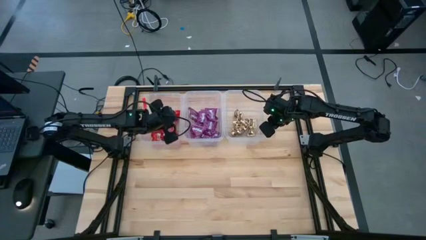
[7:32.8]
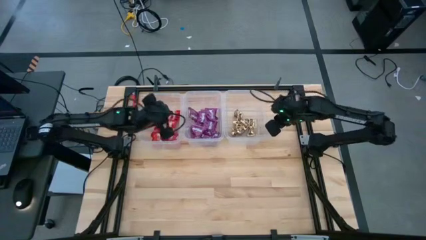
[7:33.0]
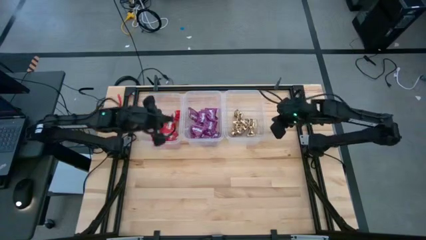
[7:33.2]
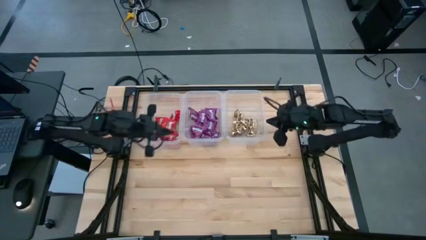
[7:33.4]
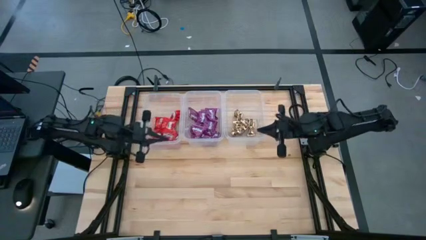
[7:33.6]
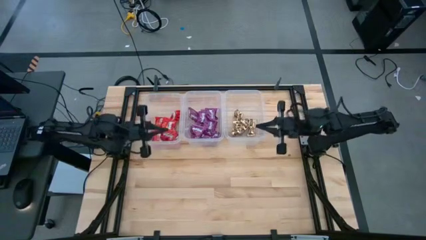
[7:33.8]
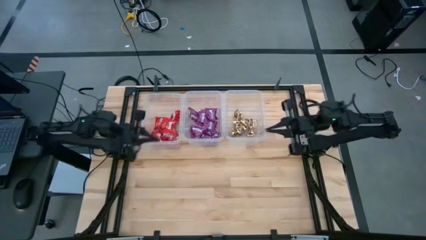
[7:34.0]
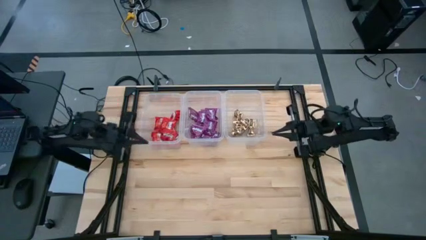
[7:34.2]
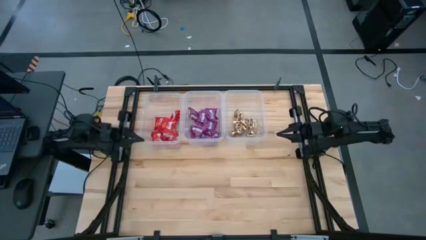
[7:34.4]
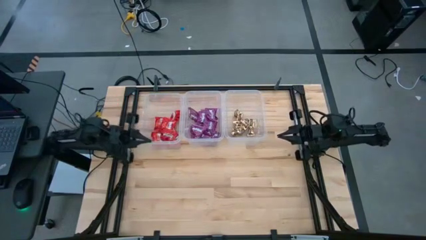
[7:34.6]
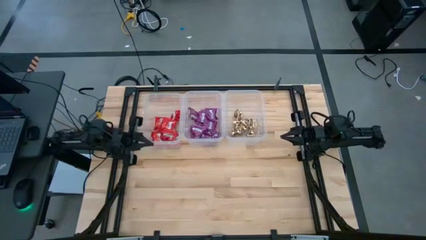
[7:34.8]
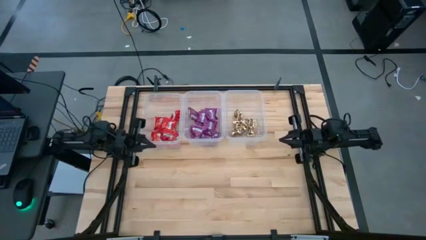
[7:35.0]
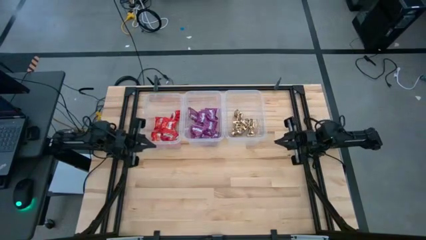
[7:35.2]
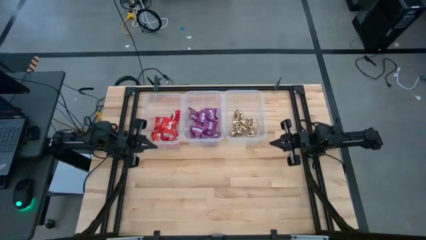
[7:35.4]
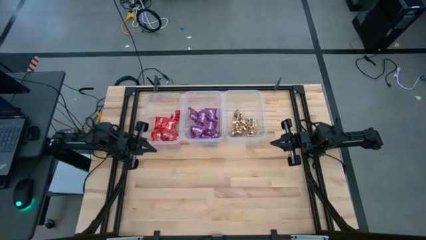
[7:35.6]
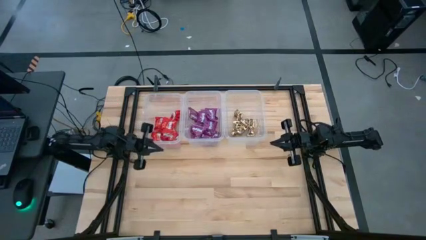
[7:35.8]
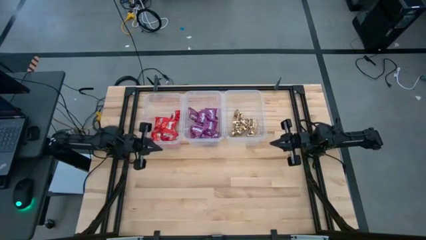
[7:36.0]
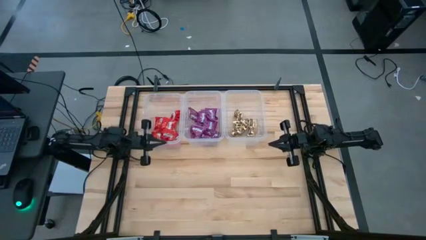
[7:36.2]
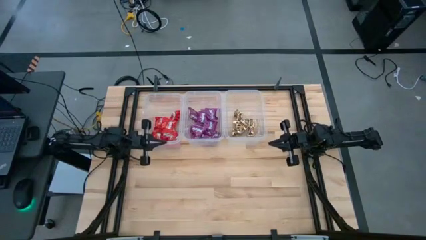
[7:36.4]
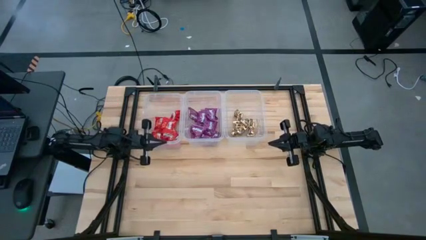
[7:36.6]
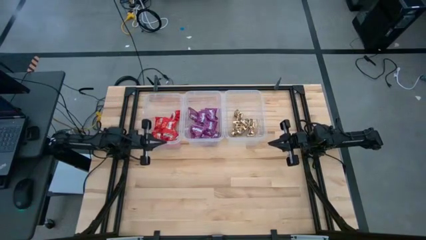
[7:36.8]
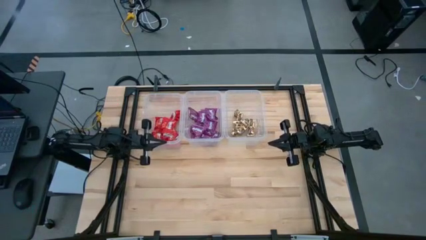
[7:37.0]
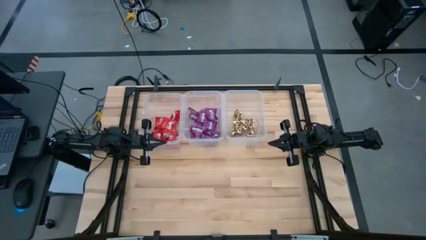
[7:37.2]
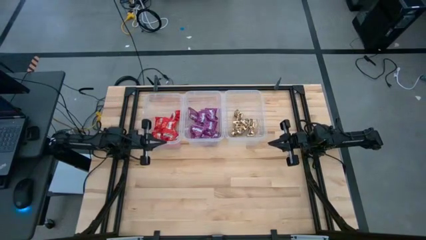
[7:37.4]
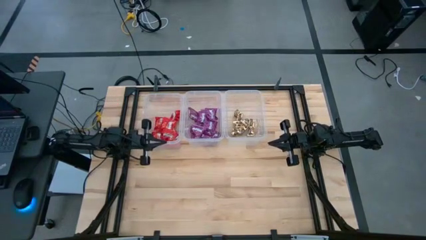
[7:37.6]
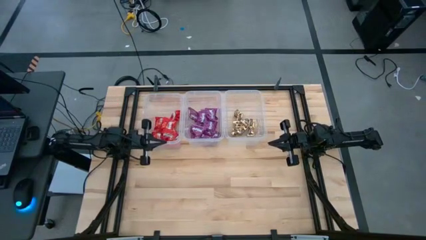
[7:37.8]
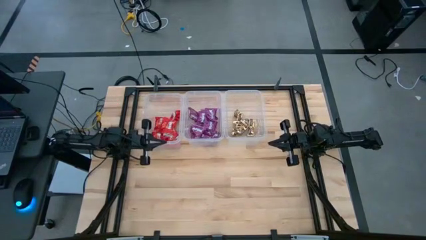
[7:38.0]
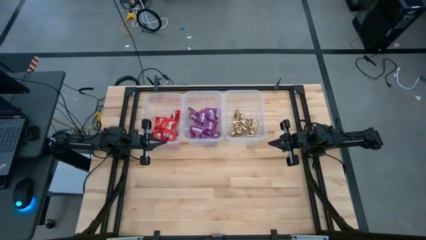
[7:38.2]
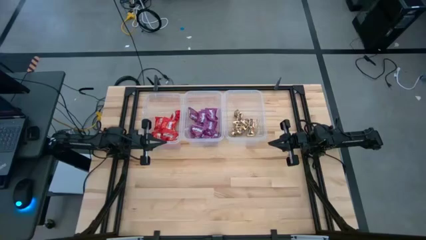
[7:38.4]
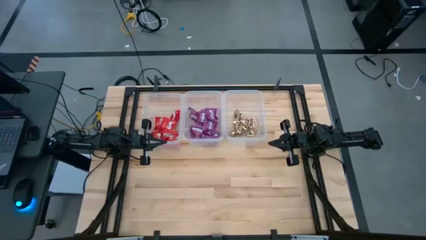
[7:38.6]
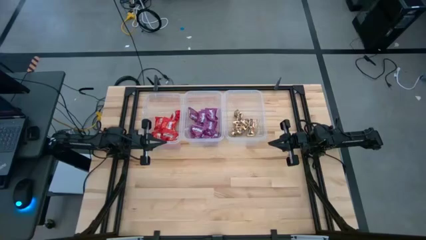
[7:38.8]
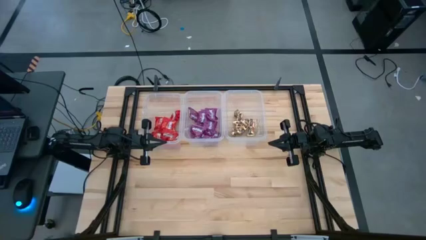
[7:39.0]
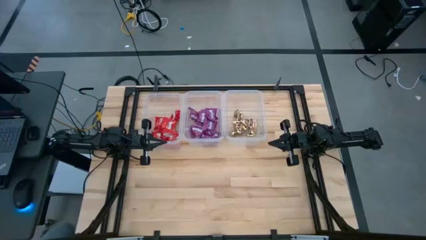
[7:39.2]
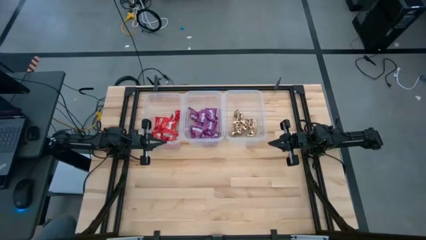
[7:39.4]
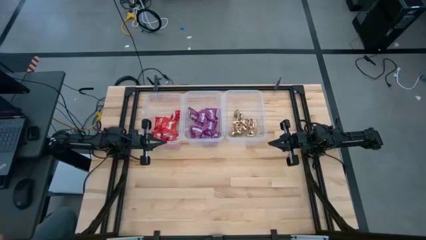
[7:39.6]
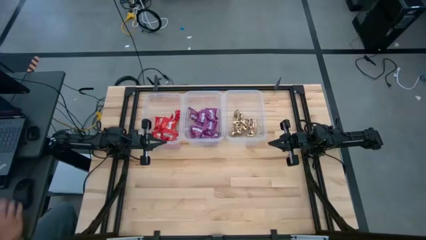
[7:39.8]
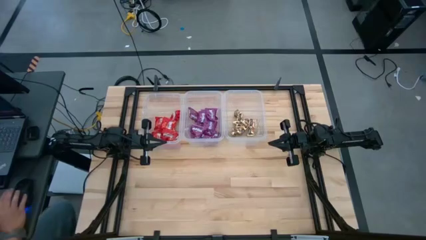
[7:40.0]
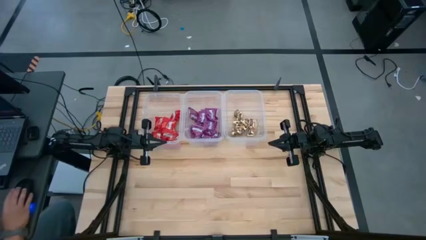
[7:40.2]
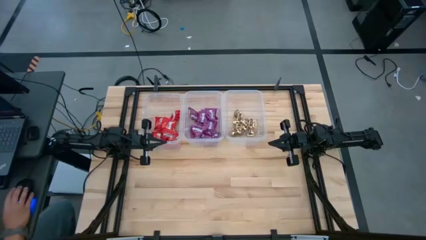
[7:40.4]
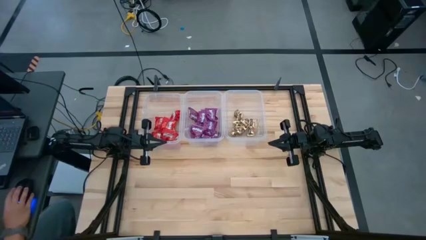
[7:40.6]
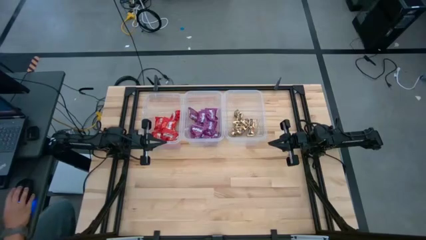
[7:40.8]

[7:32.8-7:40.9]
Task: Sort candy
Return to Home Position

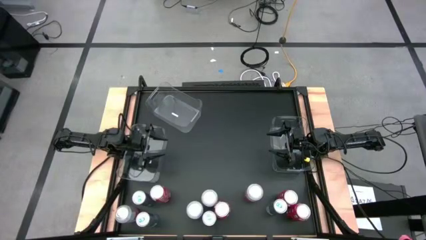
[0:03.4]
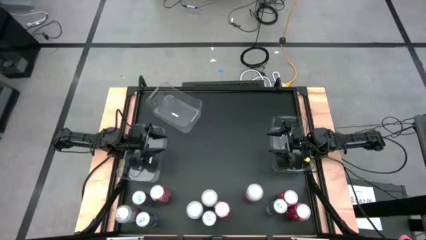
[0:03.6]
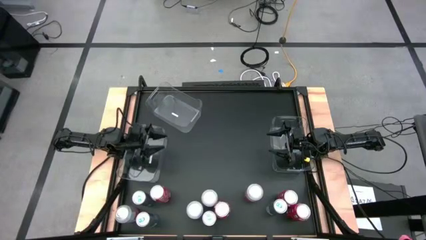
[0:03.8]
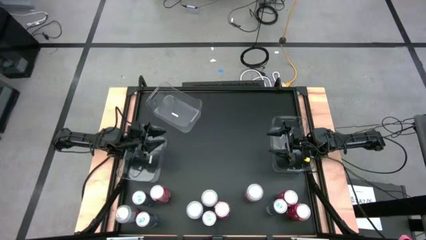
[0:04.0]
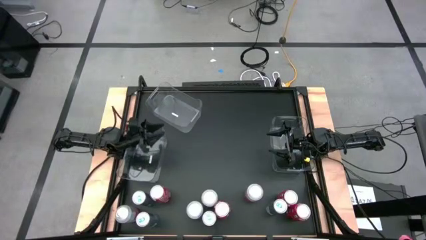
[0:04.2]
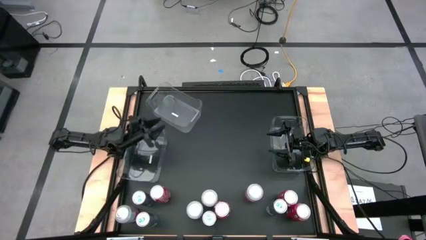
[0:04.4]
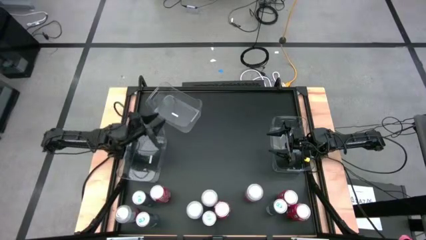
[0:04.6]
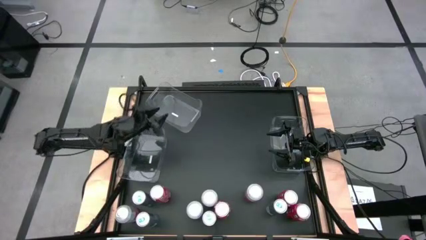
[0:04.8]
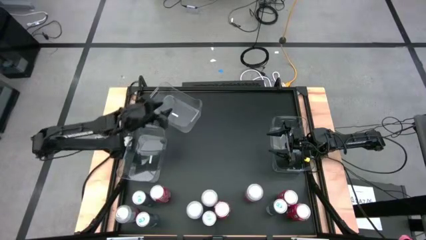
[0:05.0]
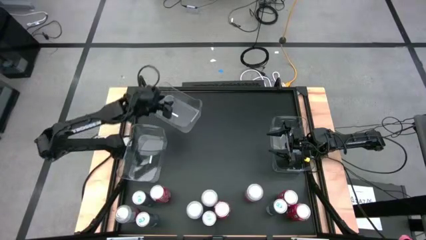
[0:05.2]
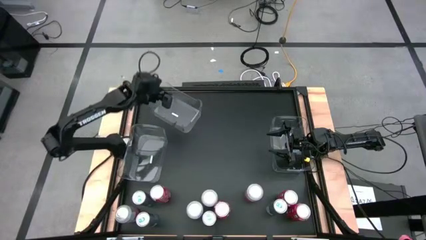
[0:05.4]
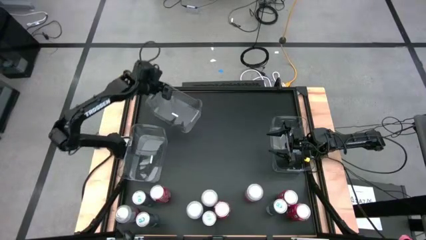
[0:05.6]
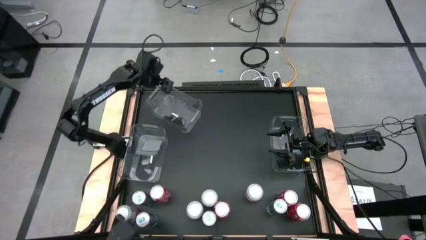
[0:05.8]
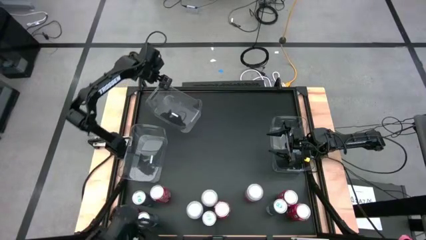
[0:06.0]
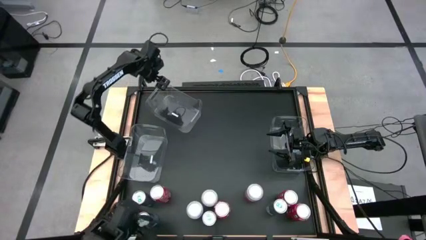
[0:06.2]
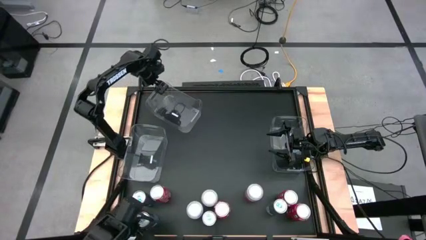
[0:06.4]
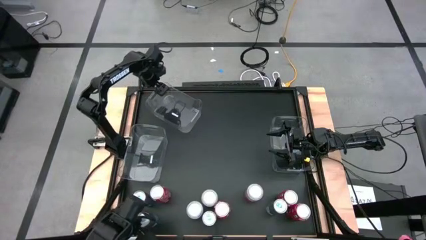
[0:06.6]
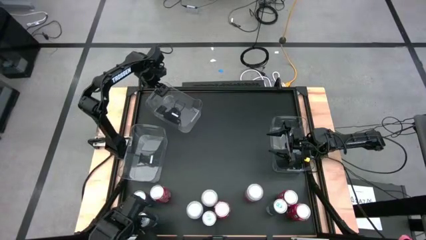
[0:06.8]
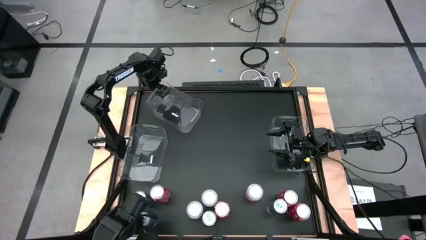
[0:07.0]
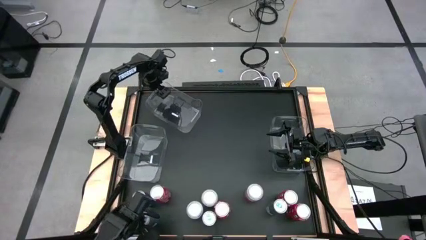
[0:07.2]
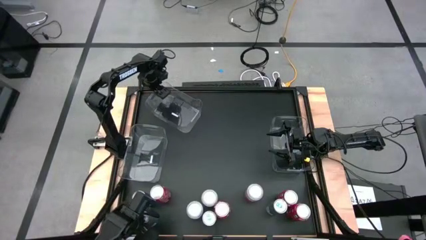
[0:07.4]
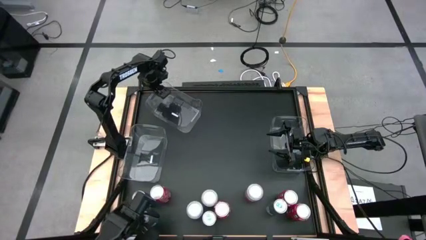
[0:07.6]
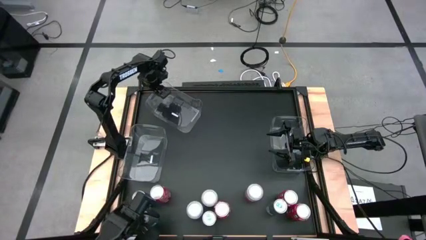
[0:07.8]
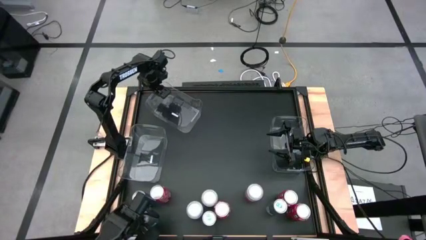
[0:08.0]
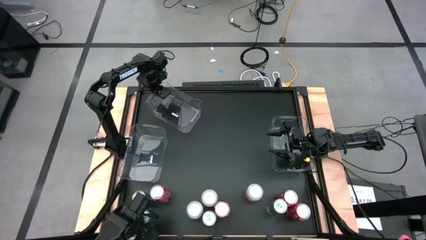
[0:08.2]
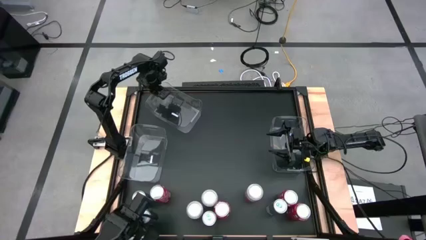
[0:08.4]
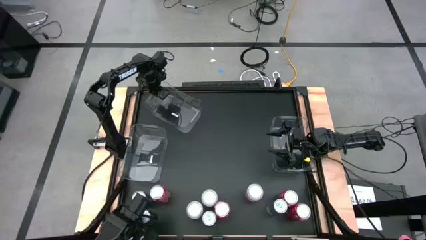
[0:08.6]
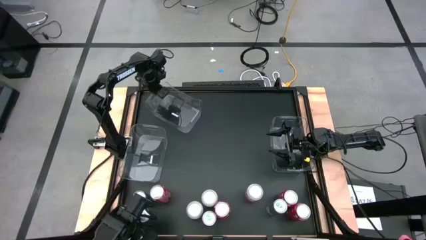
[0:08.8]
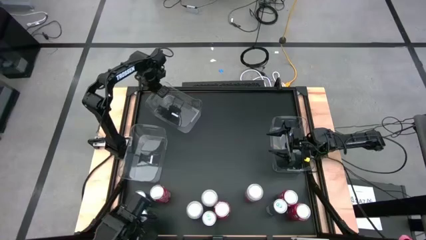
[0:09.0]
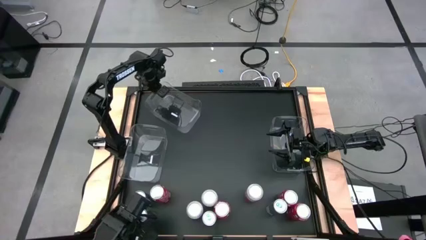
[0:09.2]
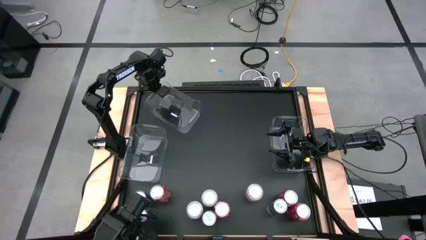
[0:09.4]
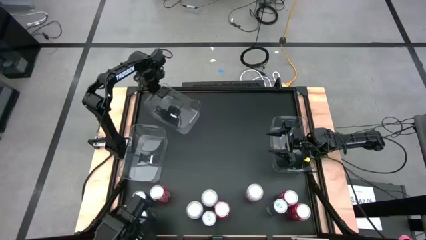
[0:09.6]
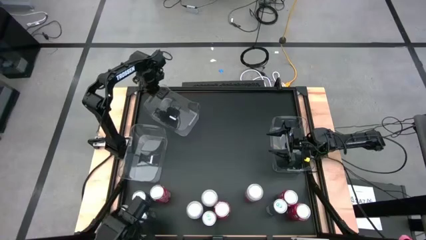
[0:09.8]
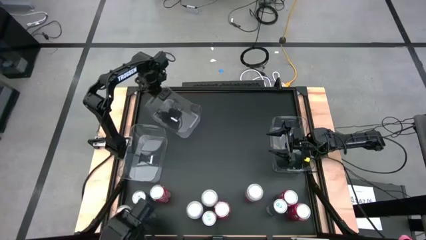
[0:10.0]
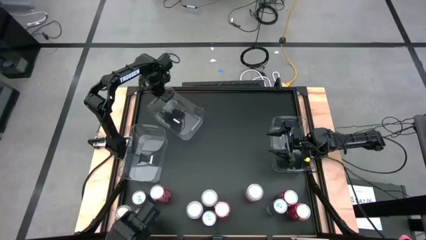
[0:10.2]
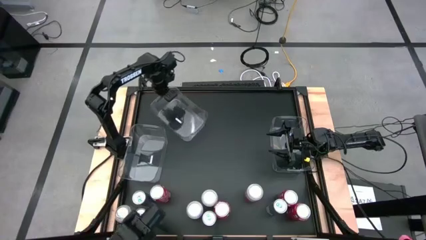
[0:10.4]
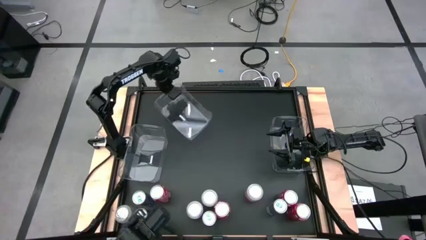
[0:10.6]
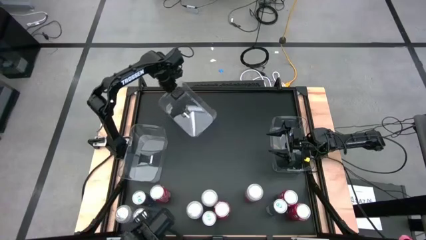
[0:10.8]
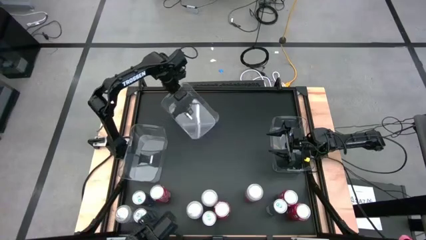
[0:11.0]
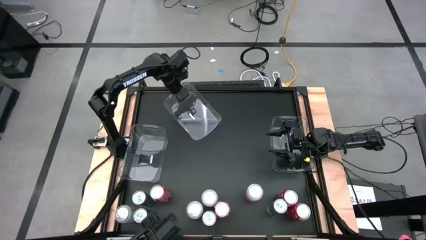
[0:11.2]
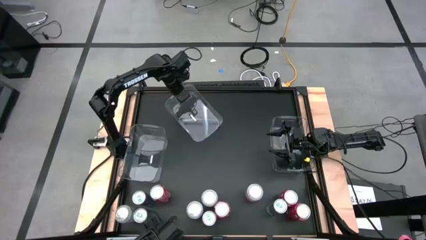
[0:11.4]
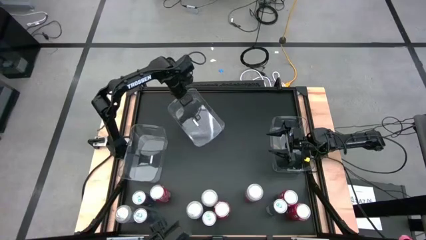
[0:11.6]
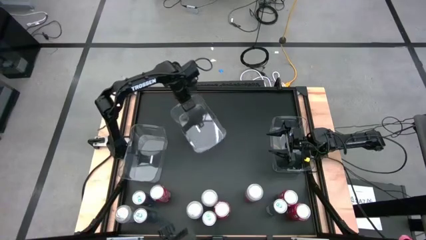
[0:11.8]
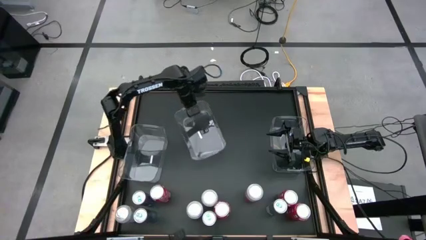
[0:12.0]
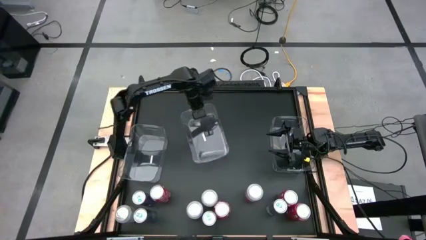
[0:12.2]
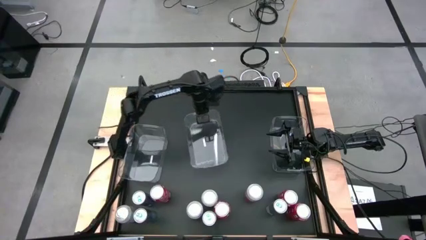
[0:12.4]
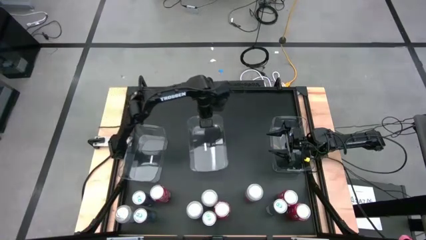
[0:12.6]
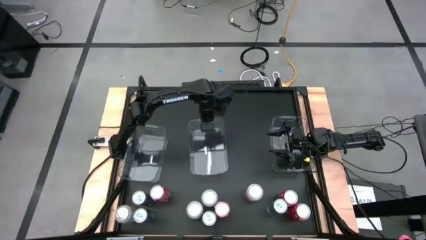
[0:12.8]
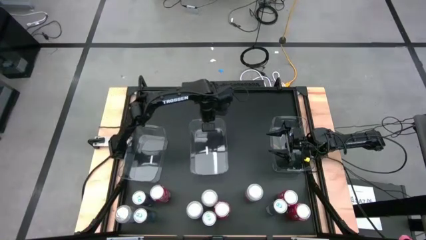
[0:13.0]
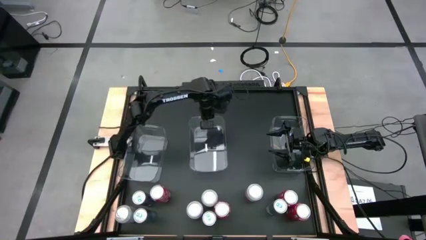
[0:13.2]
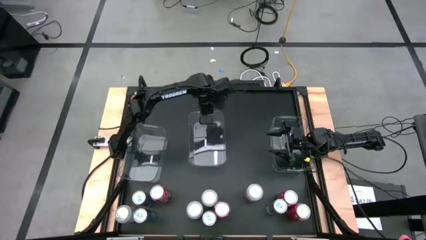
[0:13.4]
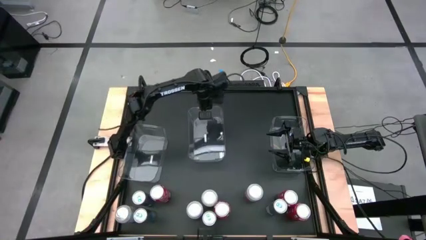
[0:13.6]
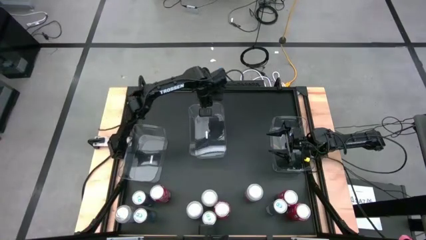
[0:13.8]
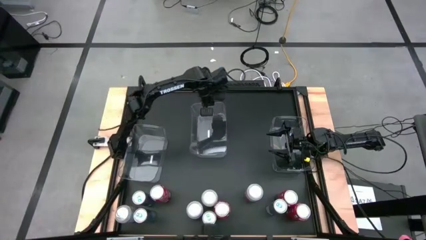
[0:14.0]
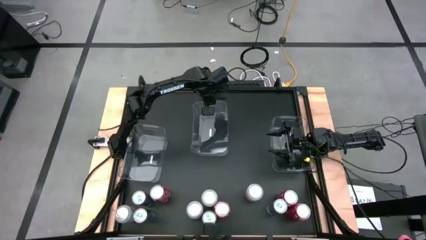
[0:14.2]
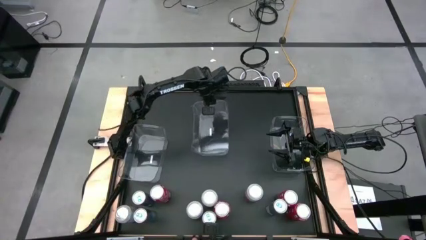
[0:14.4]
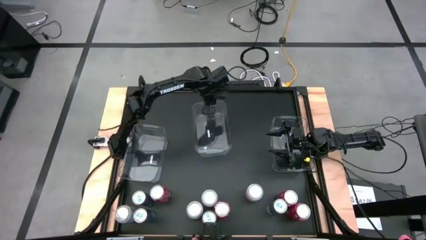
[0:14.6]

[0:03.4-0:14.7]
Task: Sort soda cans
Adjust the top transparent bin to the center
